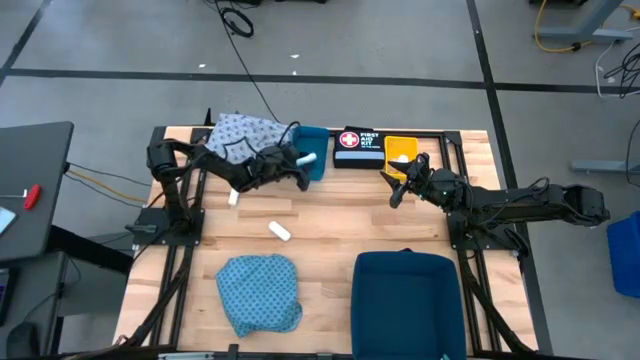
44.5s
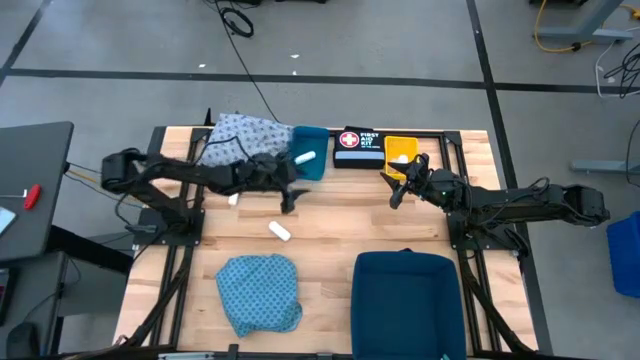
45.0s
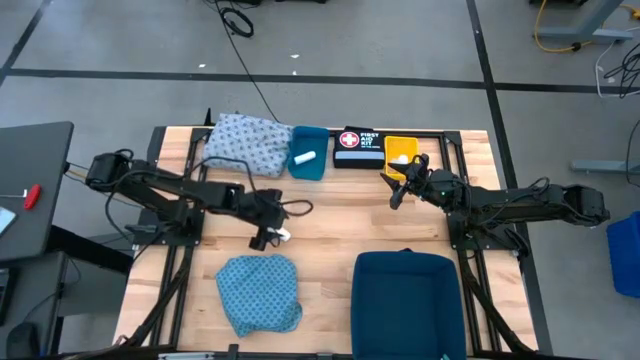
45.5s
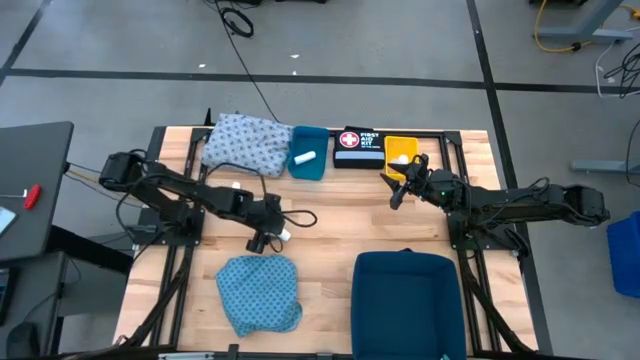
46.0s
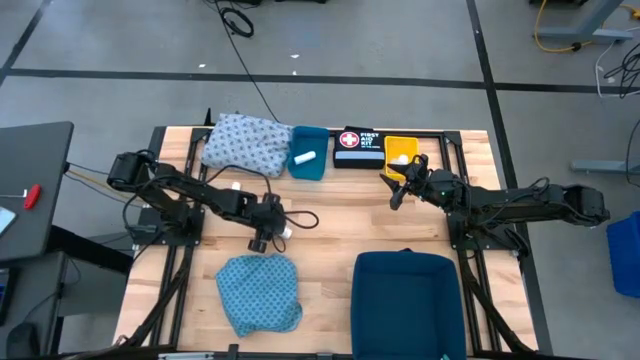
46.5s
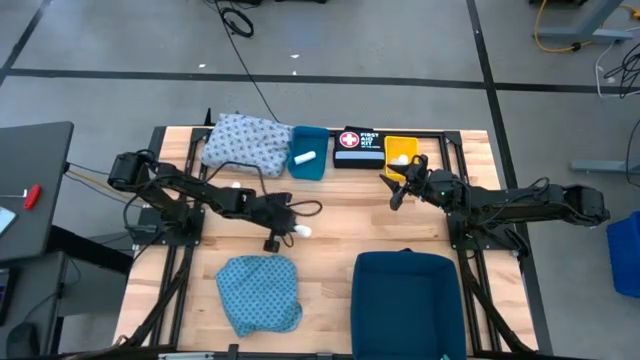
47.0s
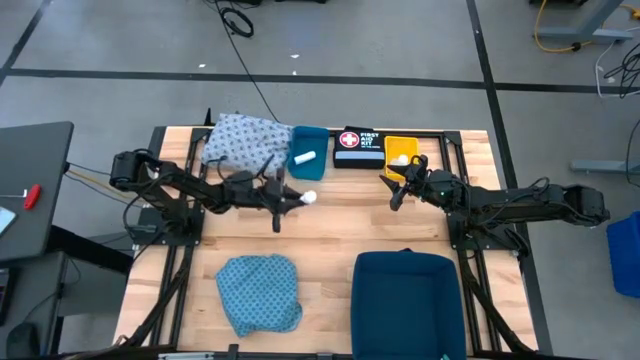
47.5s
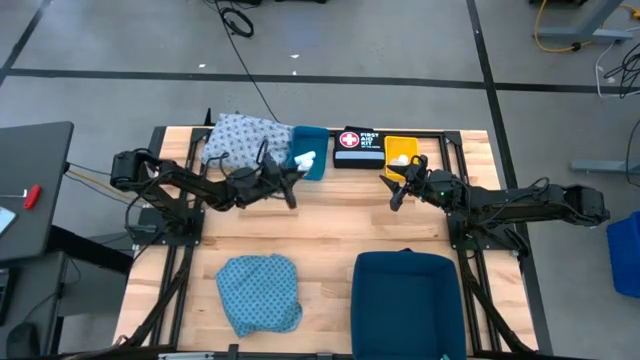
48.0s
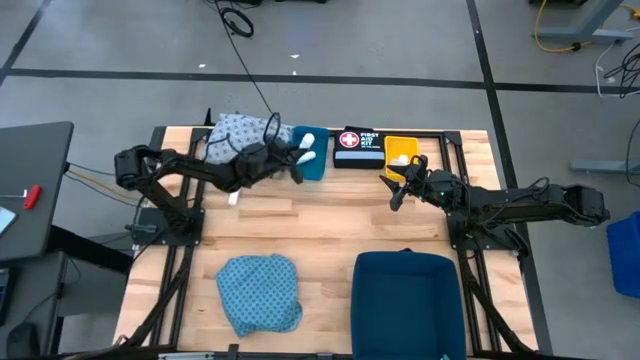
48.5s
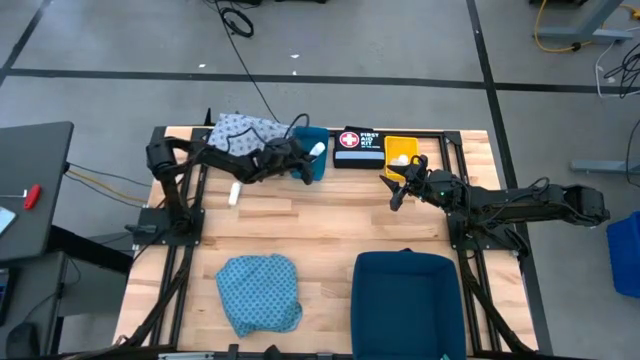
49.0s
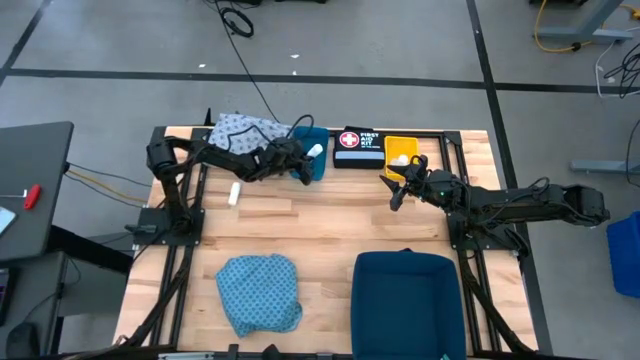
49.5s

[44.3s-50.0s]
Task: Pick & place medical supplies in basket/bin
Put the bottom white rolled gauze into the blue bin

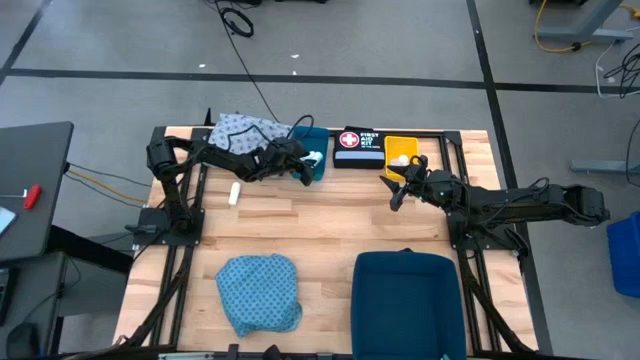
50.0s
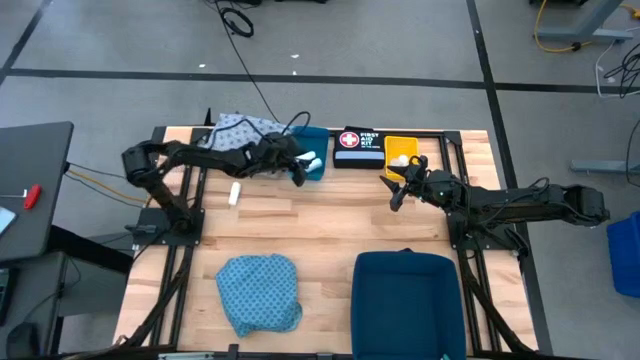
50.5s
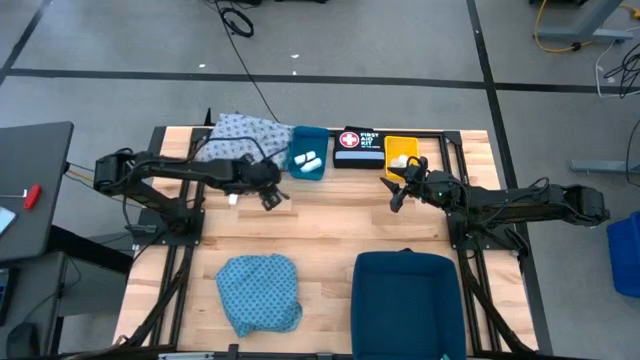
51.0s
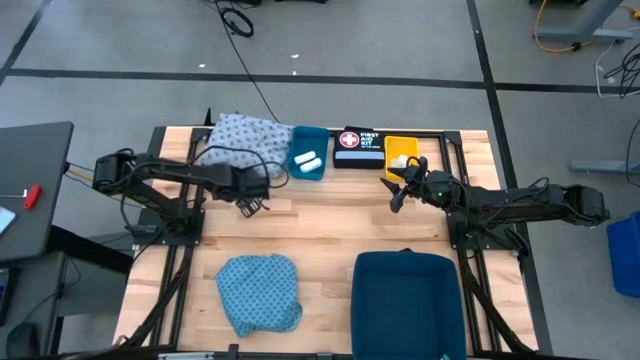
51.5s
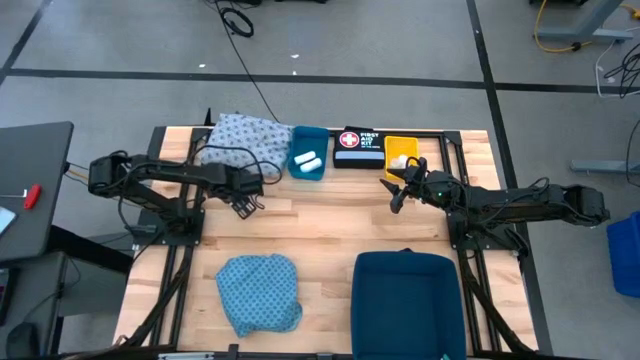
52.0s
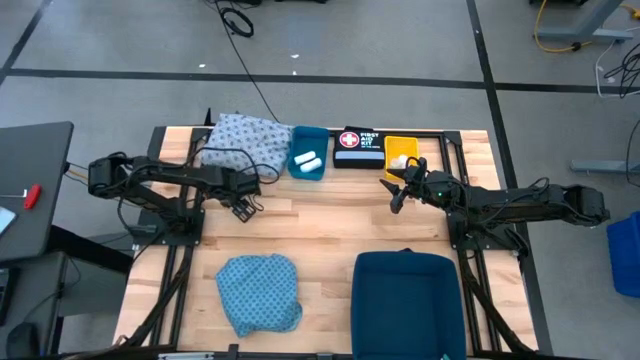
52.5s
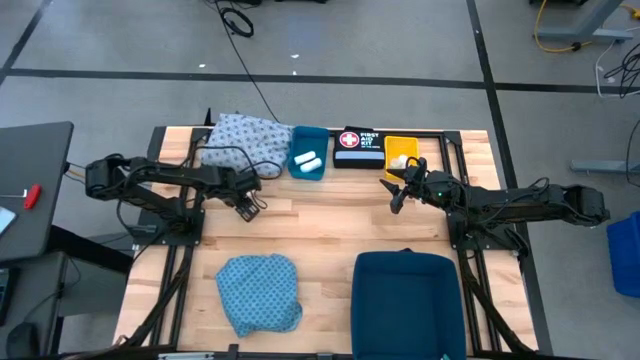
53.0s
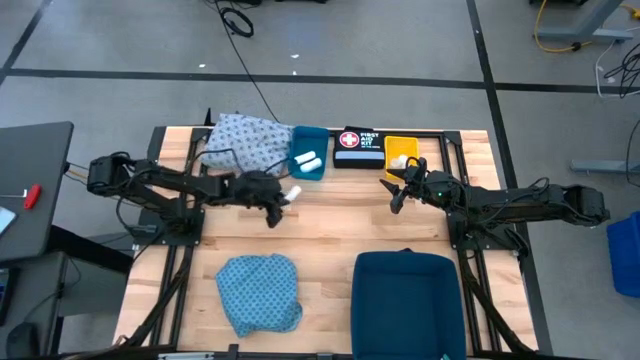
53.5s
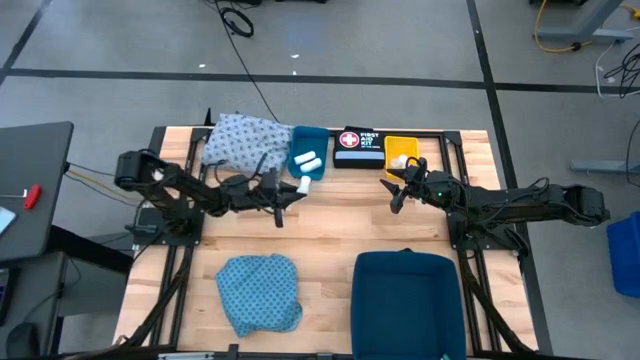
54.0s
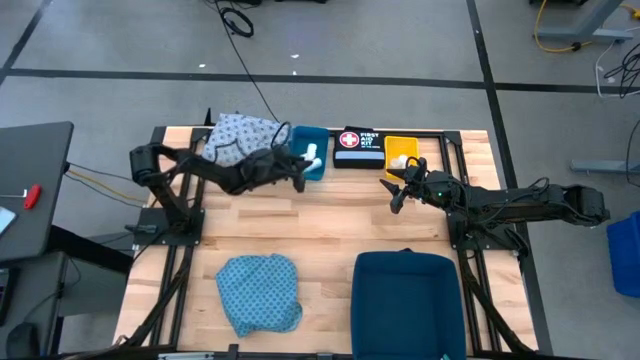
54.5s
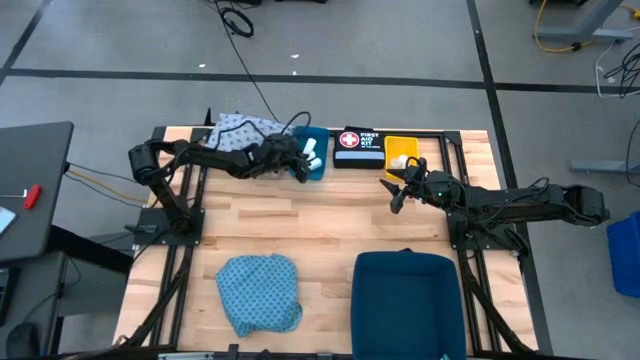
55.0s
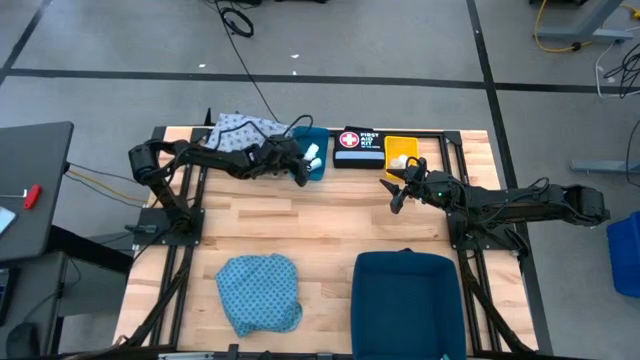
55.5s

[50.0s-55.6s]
Put the white rolled bandage into the small blue bin

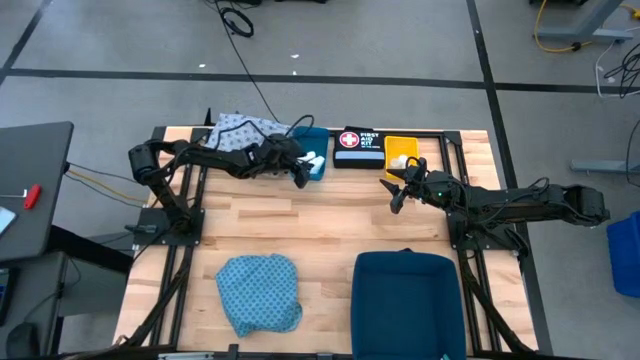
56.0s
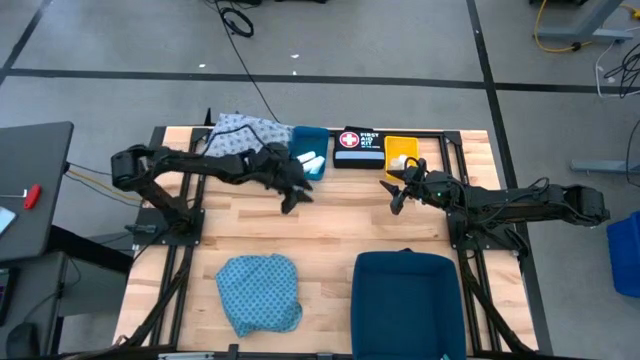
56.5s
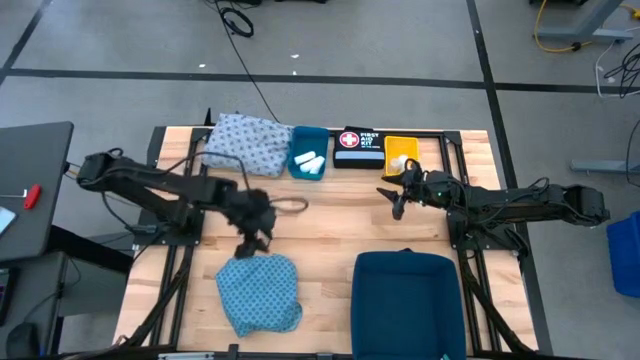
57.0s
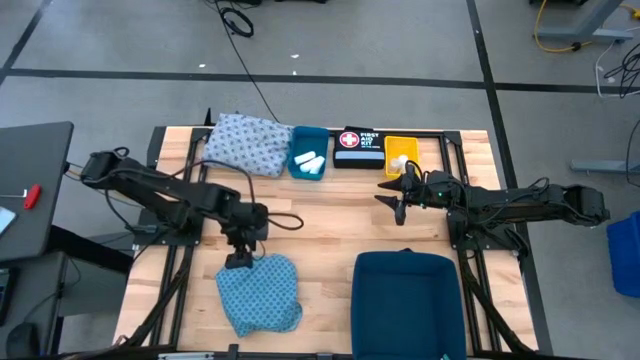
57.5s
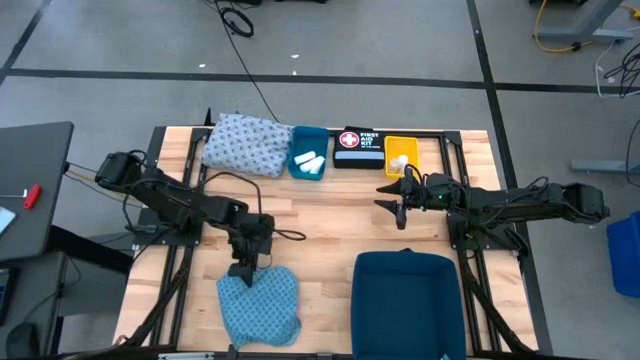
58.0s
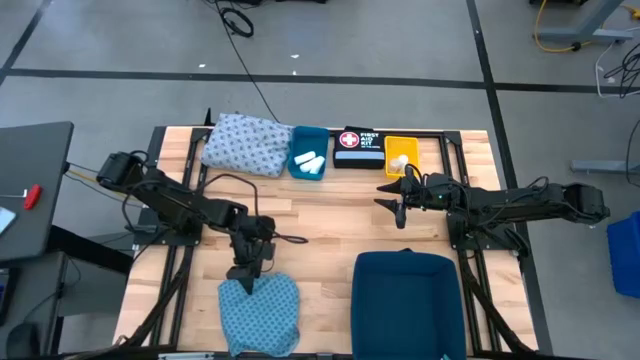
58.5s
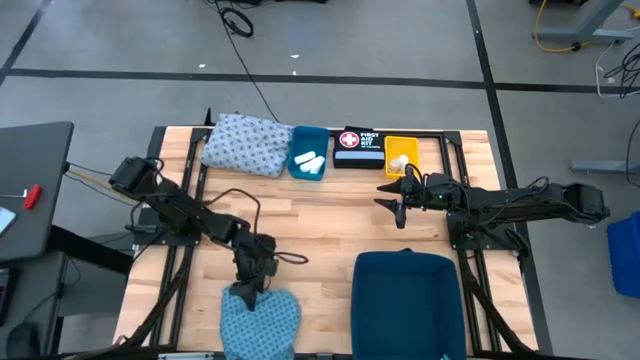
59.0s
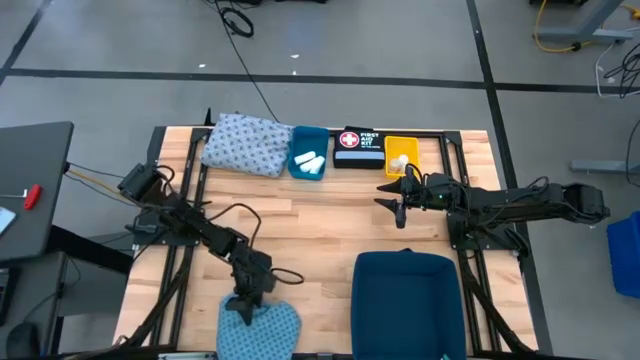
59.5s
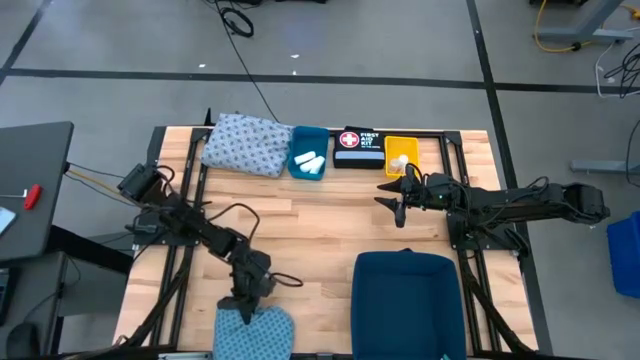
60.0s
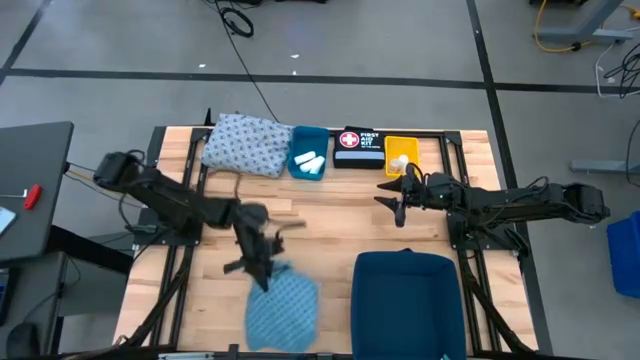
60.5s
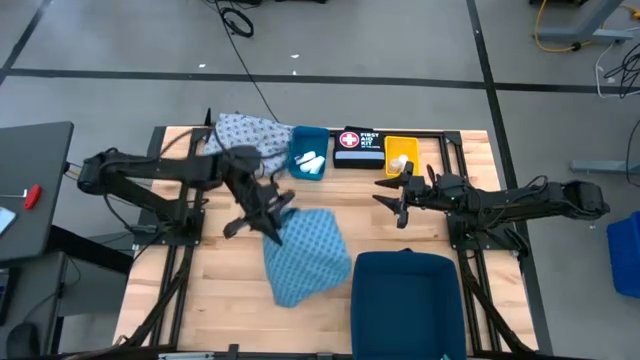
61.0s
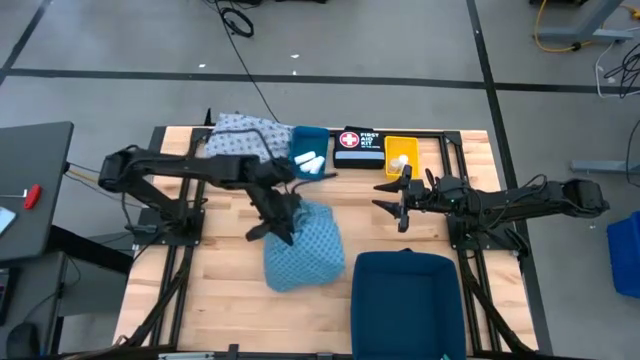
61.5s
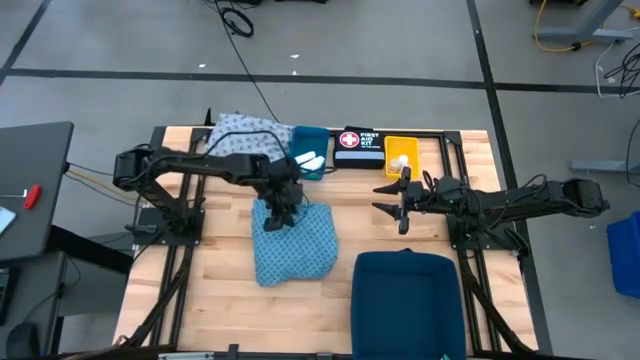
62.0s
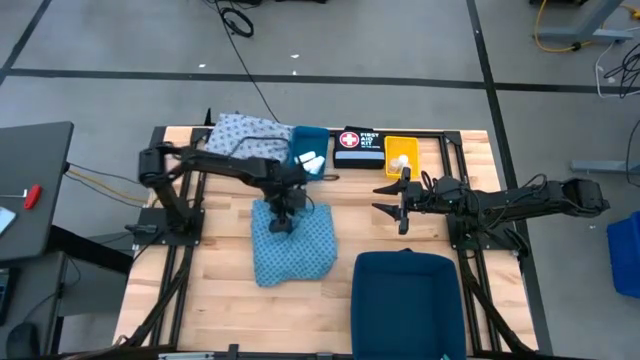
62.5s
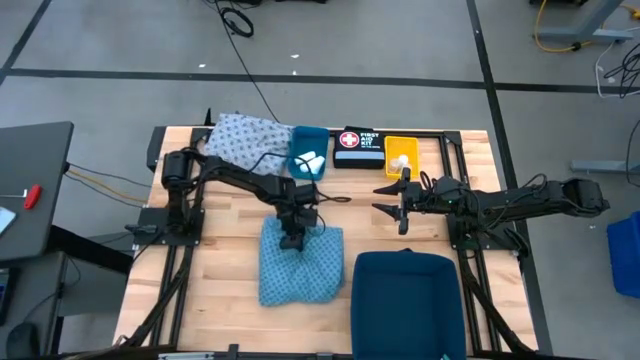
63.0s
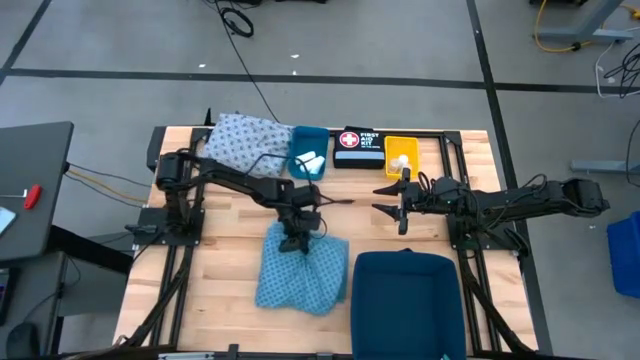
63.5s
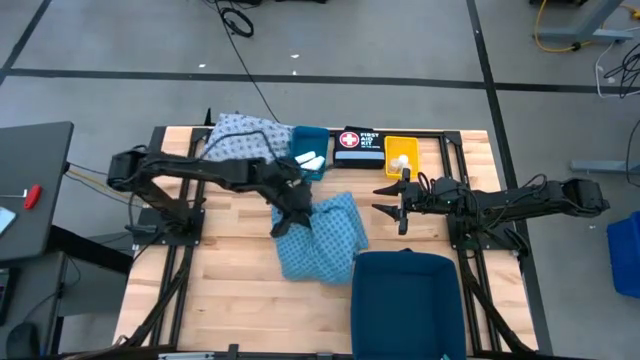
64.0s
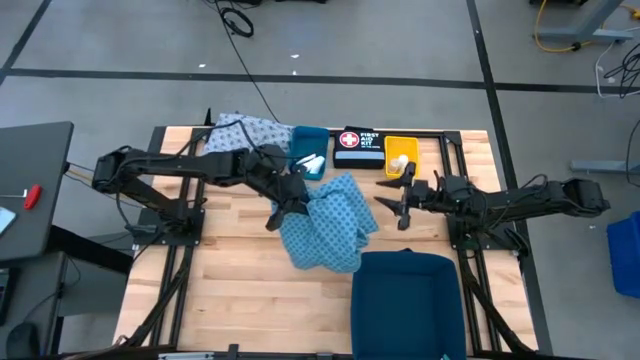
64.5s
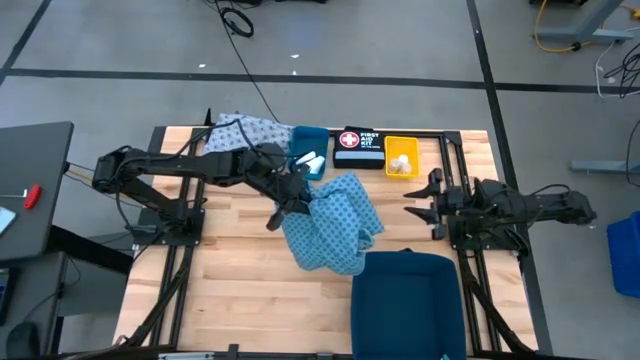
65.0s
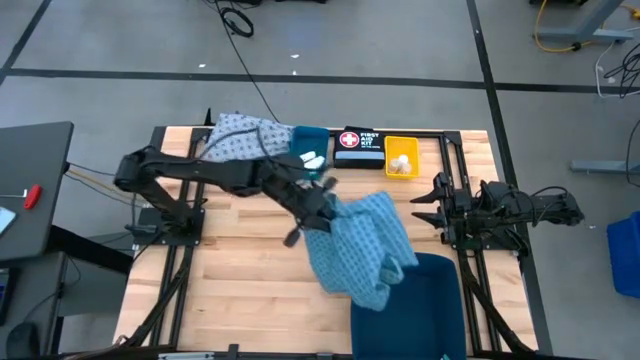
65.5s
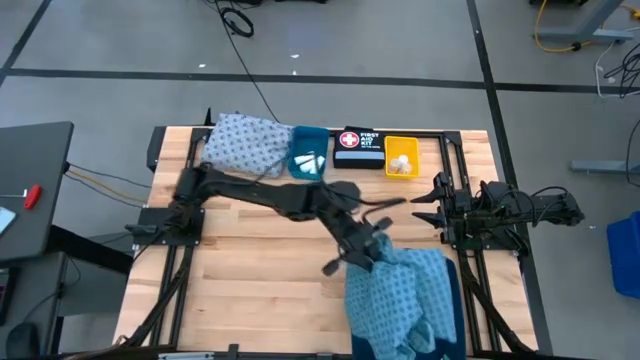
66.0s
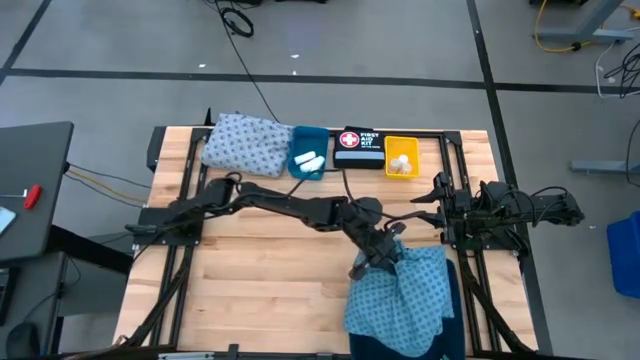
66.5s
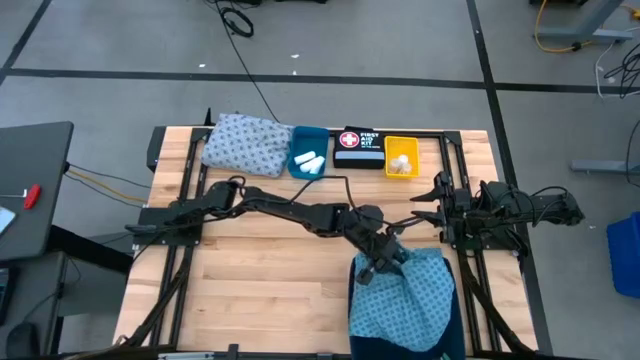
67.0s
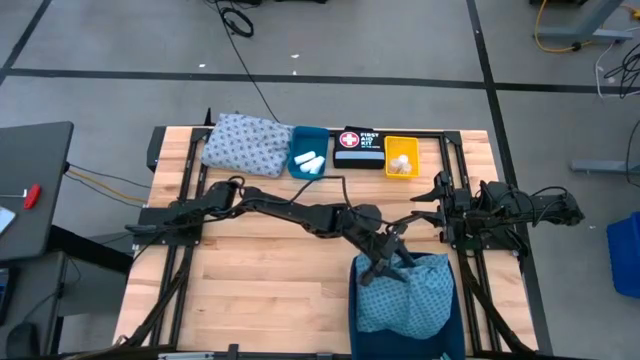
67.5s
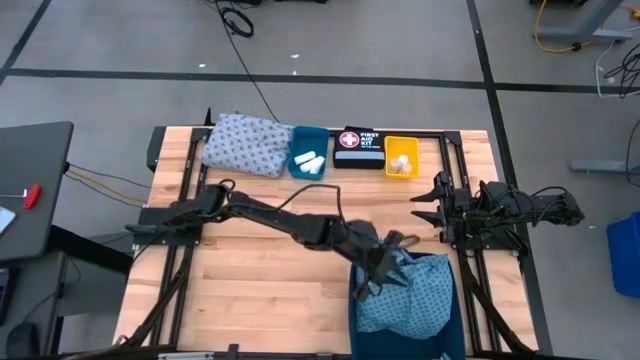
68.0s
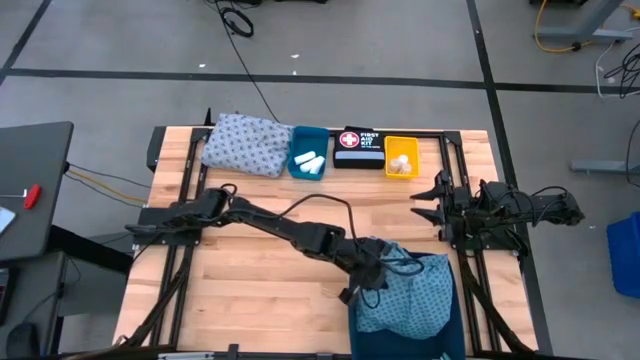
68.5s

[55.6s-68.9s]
Put the blue patient gown into the blue organizer bin
